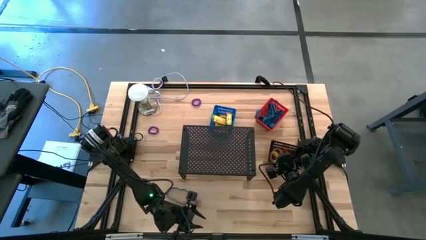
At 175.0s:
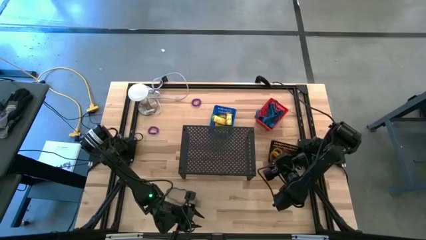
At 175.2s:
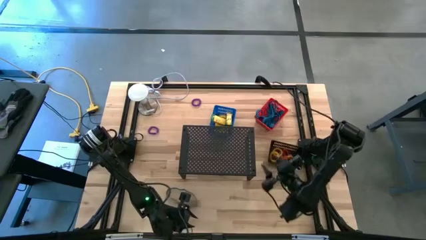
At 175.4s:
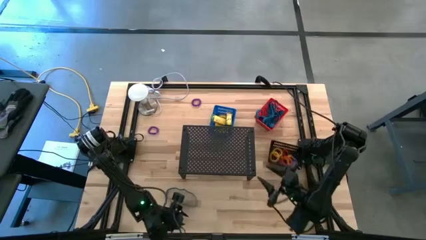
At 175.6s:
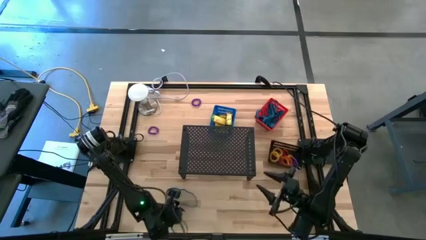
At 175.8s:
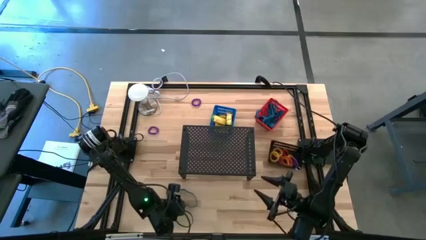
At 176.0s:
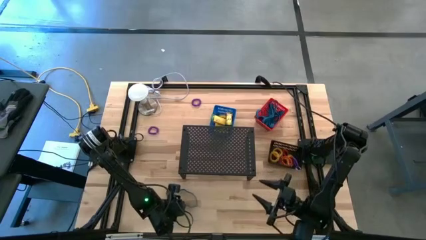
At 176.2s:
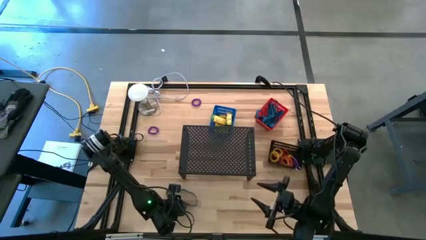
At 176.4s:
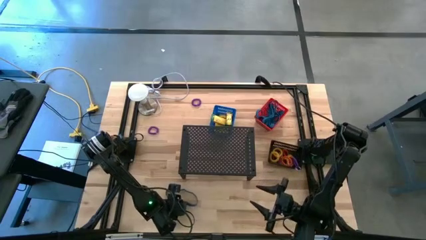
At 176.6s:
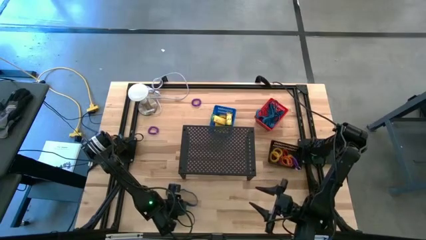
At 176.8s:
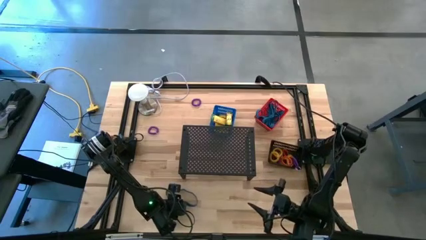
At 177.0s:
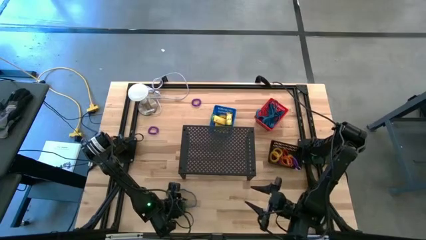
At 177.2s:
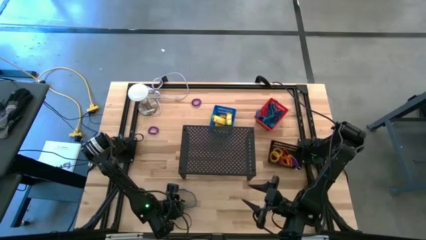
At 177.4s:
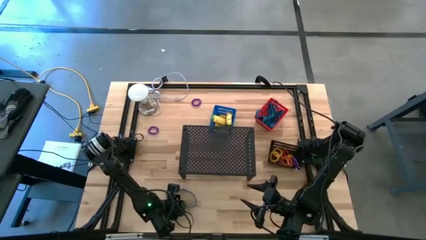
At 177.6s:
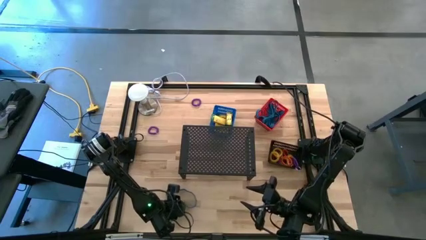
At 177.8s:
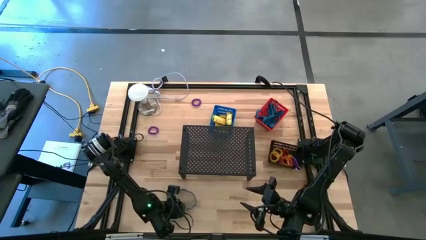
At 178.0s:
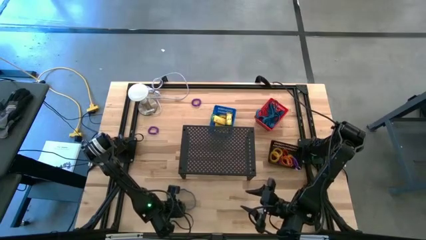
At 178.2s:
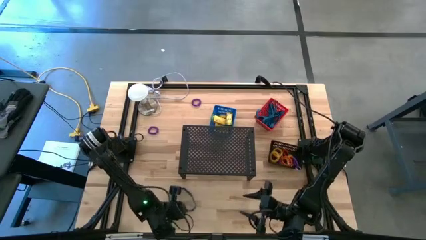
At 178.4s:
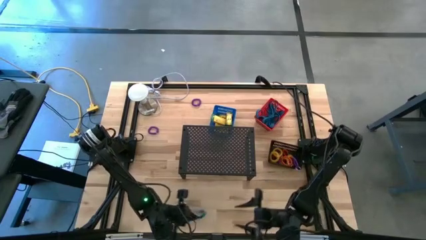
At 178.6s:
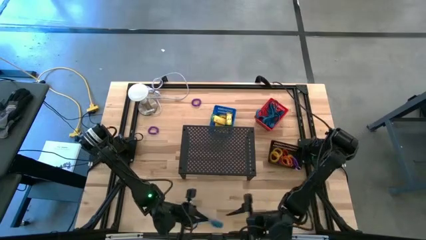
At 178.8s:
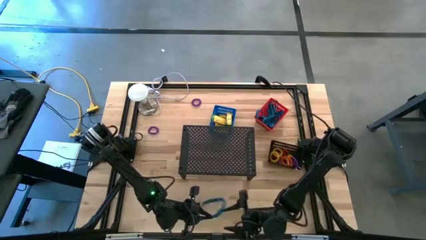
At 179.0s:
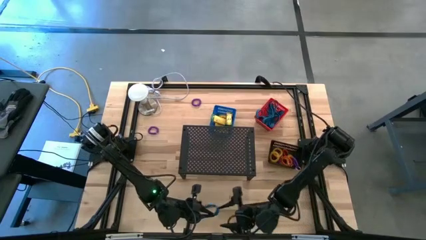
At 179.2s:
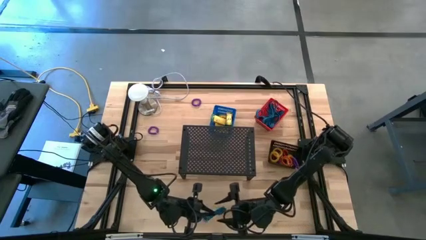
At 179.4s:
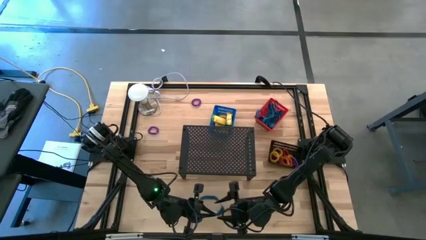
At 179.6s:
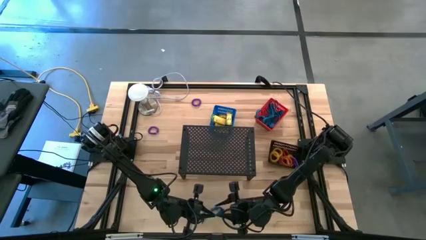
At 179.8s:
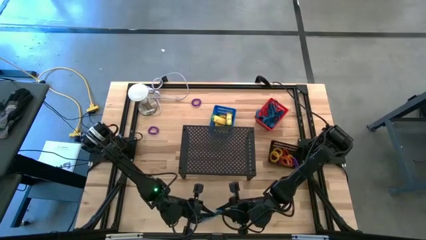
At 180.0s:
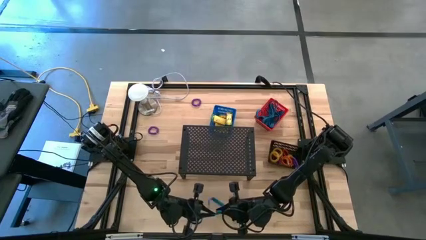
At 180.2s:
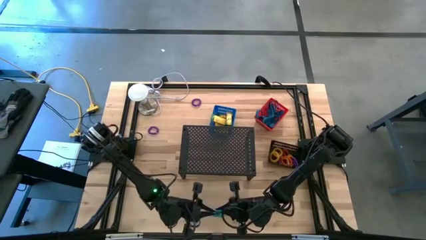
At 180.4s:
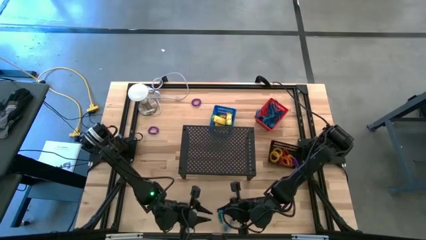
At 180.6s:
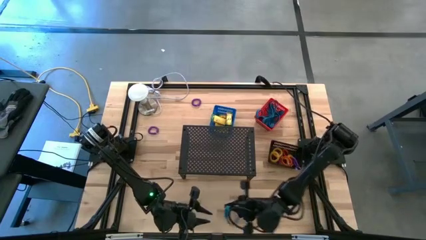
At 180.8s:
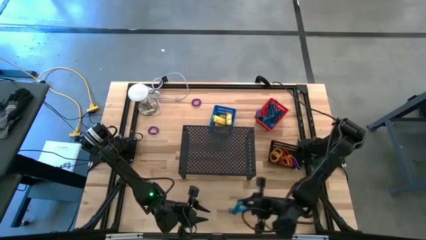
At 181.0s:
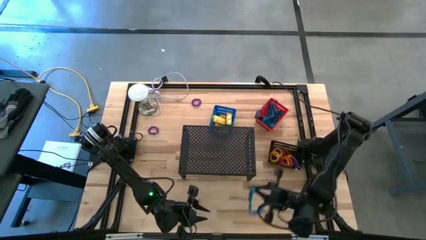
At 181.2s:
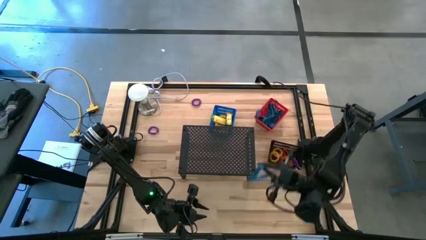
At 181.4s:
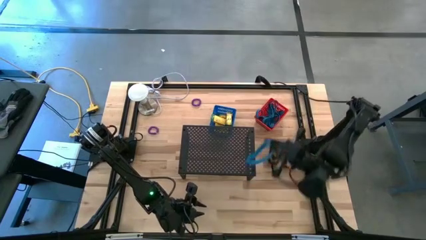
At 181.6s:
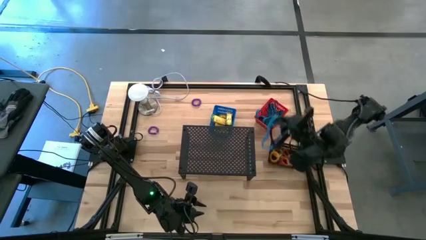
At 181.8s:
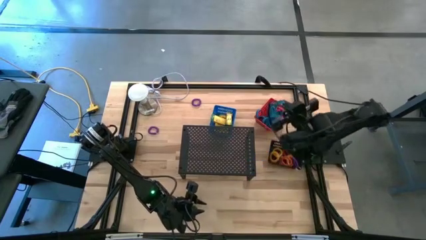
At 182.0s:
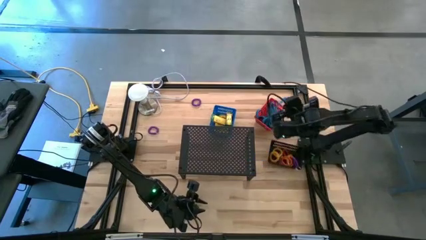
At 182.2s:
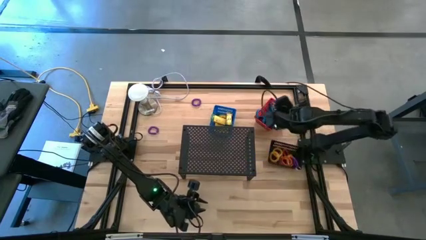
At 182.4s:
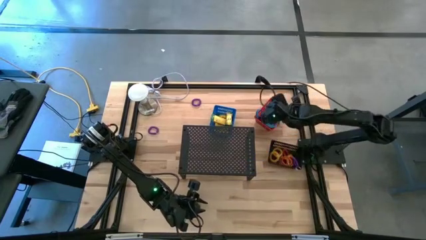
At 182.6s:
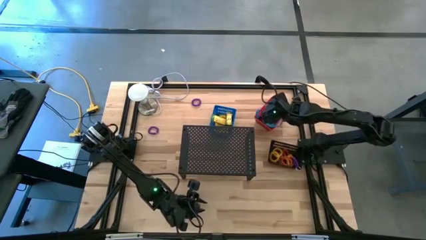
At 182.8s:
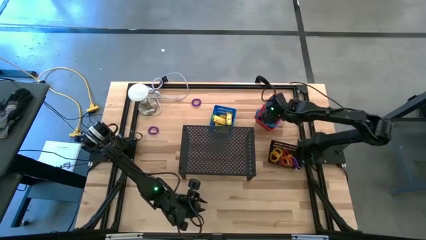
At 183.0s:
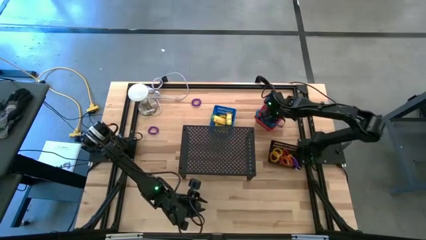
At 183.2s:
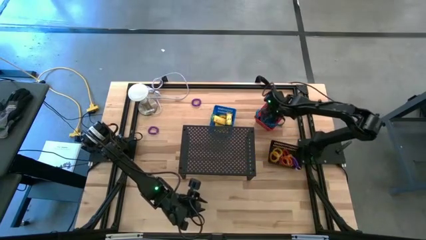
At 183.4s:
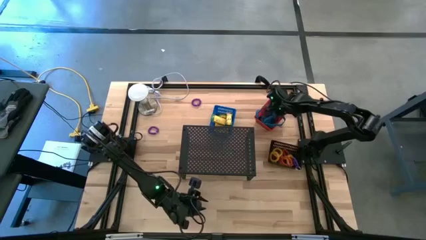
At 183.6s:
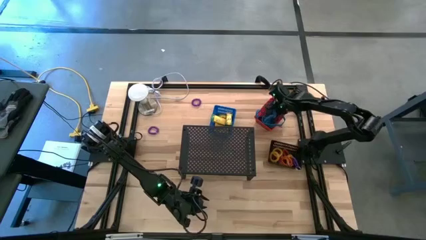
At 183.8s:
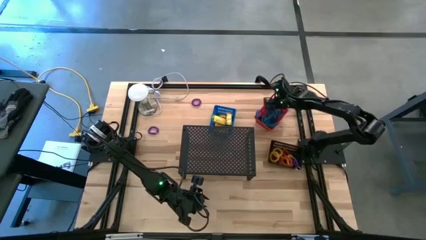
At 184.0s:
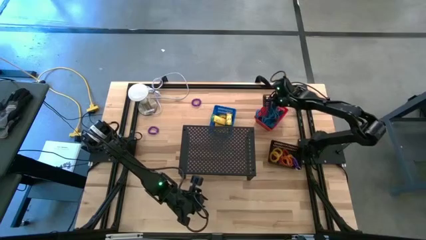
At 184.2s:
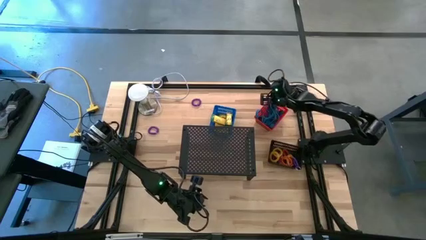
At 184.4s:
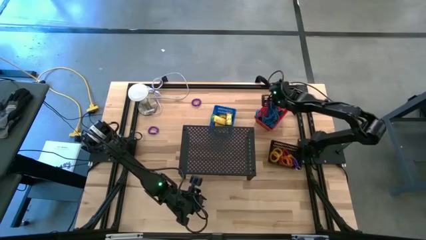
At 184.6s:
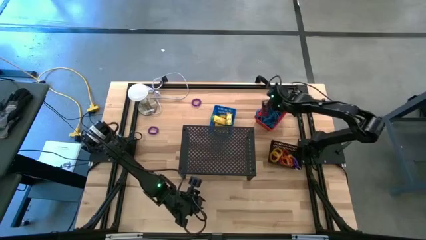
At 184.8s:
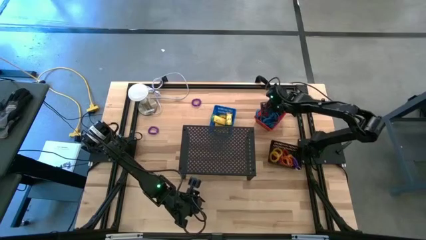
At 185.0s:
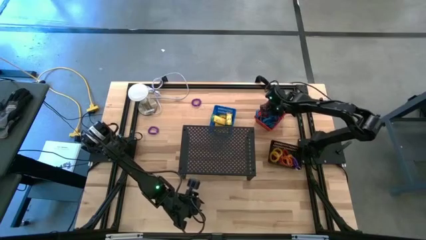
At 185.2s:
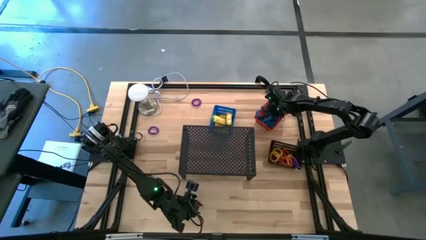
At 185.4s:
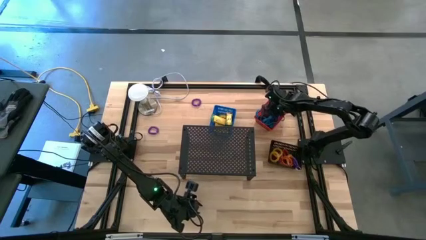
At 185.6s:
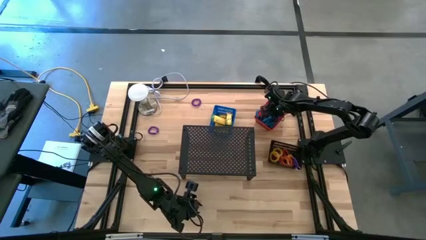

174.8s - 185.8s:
Task: Pick & Place Office Desk Supplies
Put the blue rubber band into the red bin

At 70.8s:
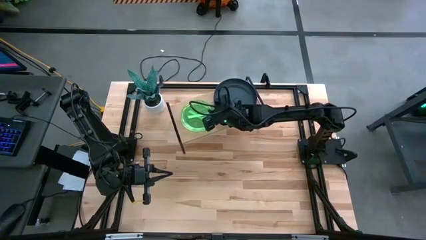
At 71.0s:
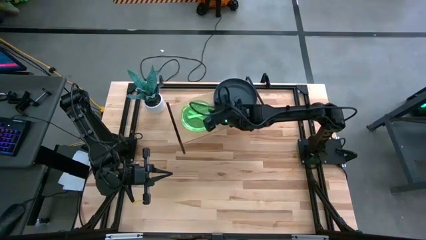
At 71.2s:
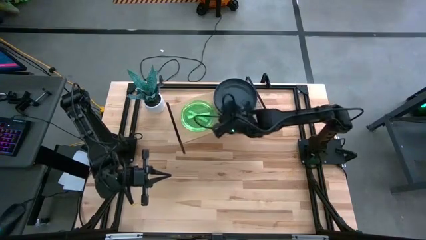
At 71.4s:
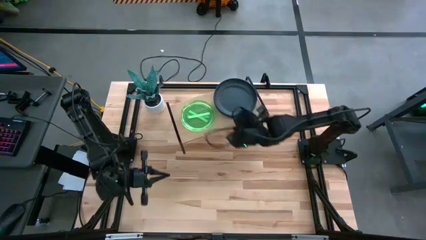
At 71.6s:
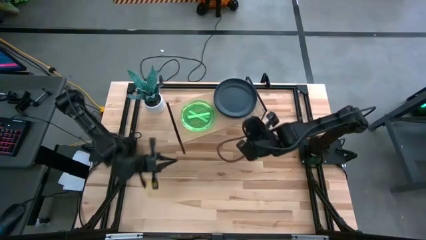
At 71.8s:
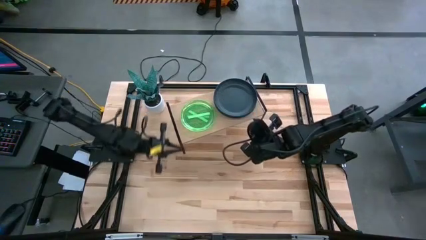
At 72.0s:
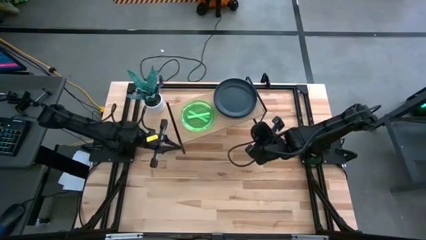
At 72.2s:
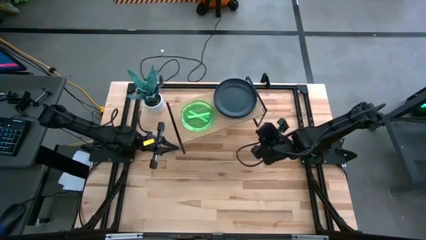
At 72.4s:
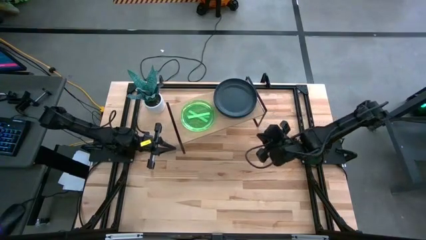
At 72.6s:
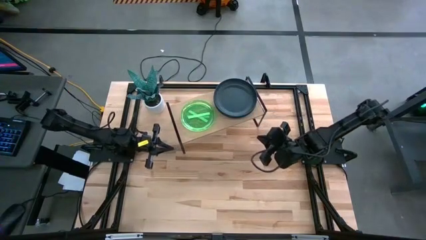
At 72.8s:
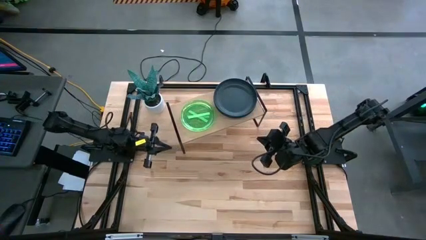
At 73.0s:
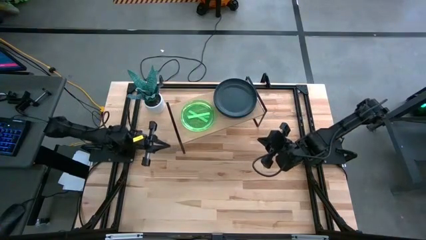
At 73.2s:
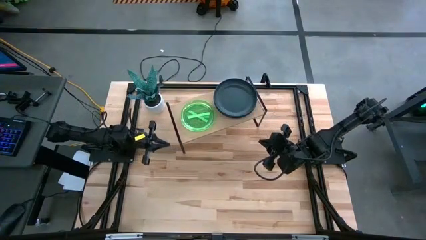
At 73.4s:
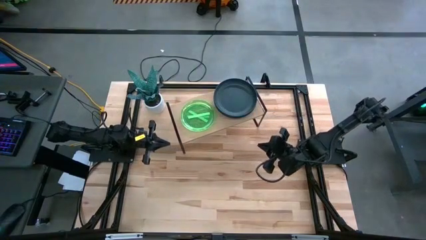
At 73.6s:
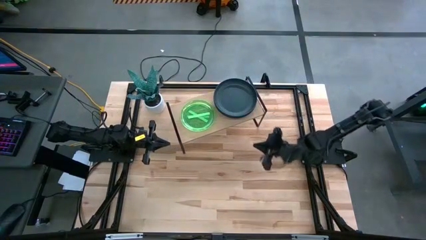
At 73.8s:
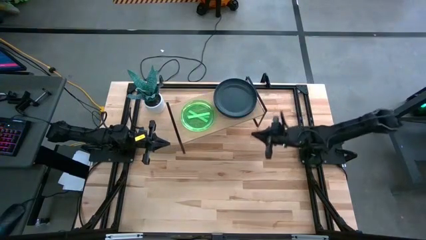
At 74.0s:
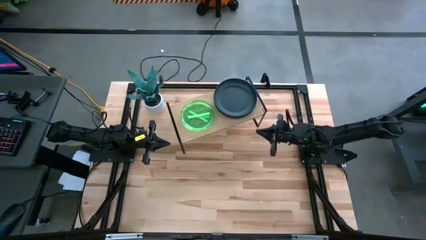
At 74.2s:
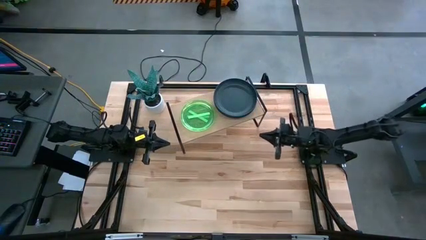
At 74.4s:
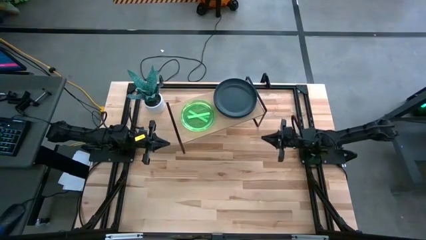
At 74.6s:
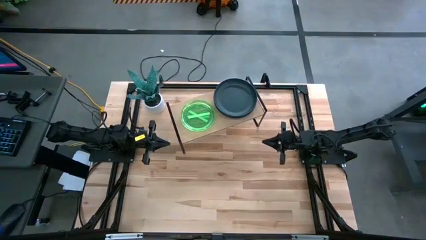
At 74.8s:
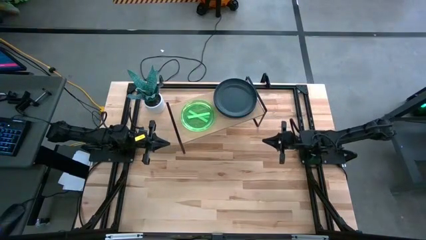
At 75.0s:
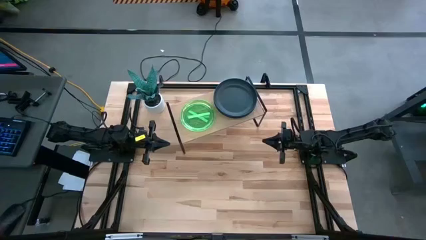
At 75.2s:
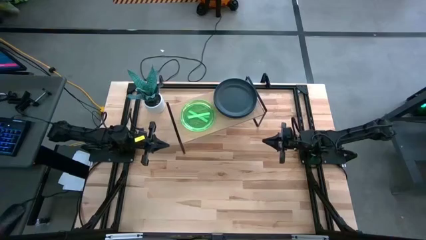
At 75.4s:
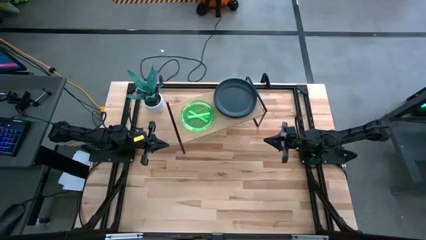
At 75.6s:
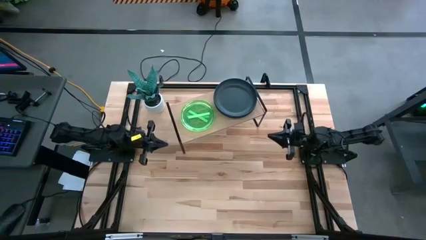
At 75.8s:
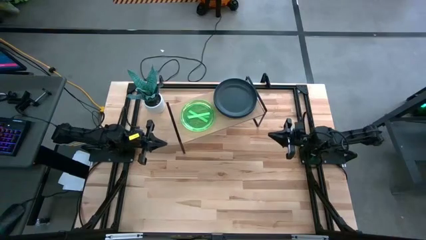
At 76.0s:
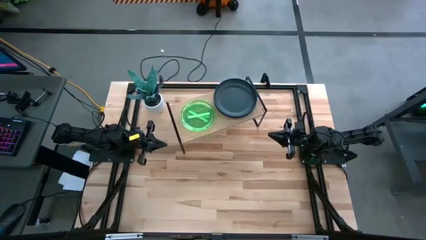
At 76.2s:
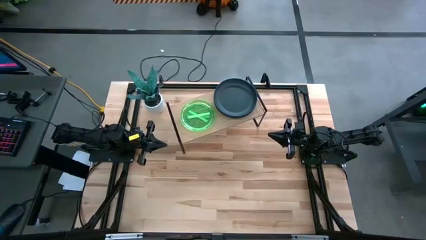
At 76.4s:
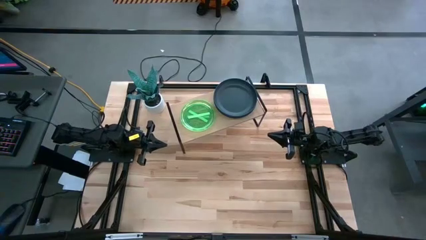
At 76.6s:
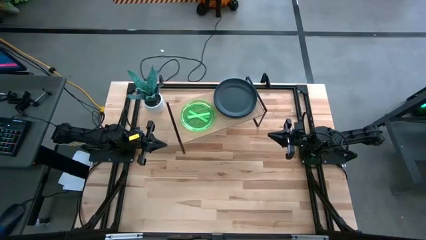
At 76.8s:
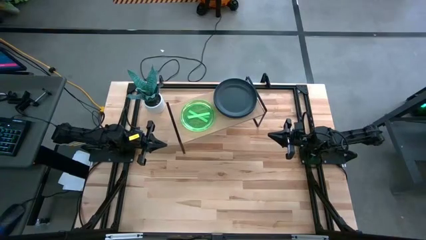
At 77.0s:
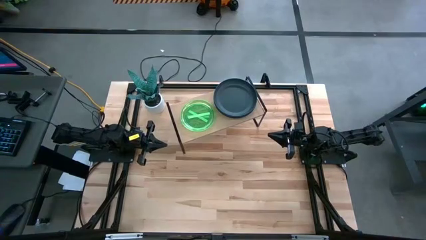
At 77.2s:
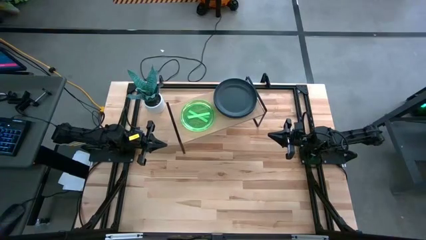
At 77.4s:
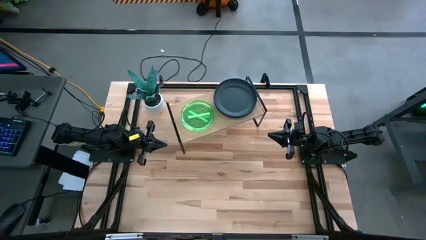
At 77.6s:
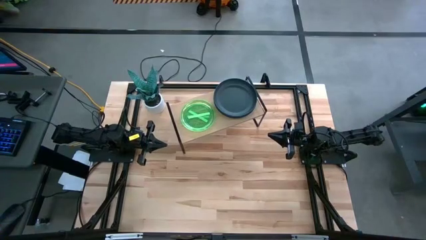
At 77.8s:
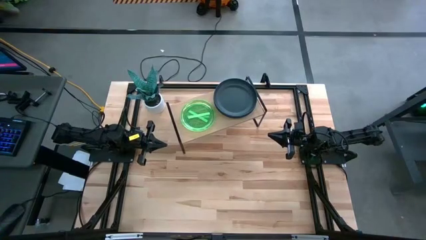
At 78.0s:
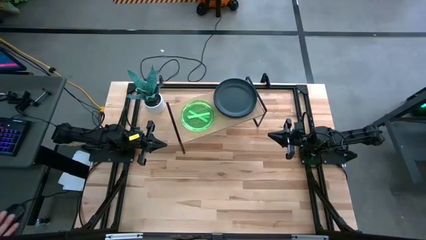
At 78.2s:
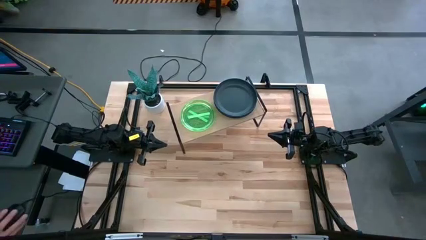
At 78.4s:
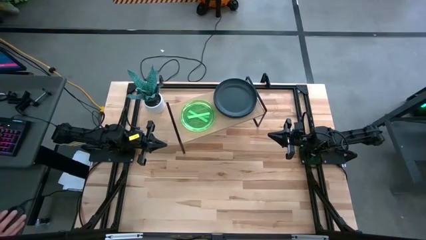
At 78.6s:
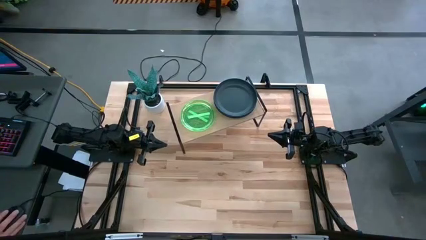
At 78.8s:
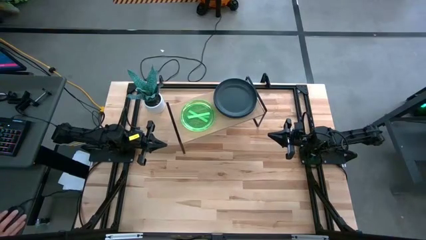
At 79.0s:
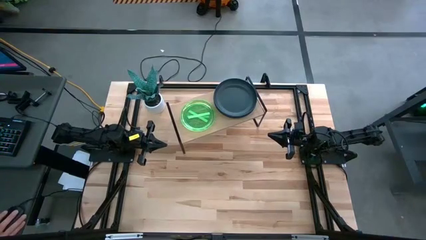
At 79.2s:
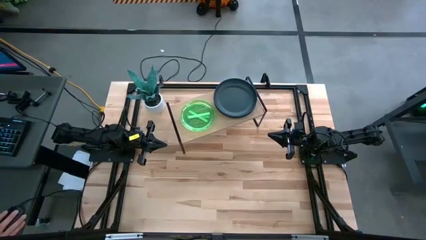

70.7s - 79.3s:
Task: Place and stack plates onto a shelf
Return to Home Position
